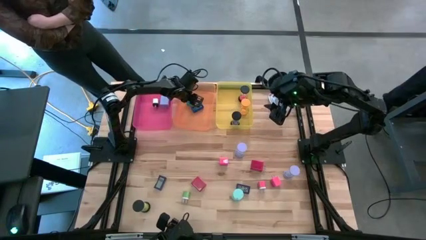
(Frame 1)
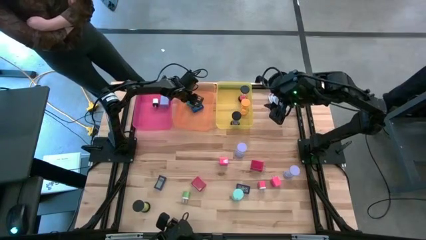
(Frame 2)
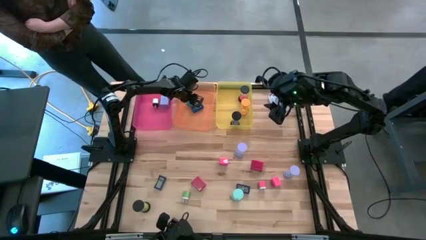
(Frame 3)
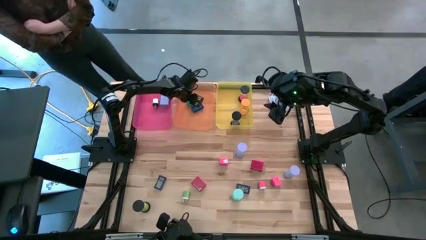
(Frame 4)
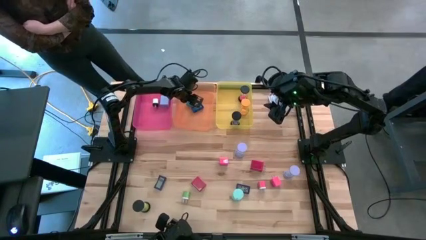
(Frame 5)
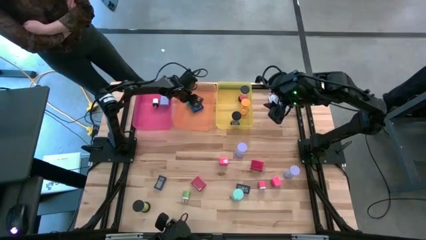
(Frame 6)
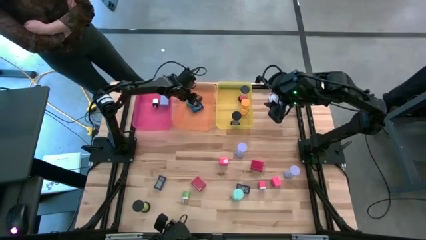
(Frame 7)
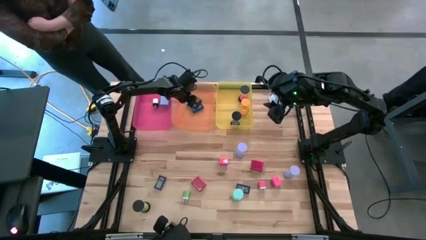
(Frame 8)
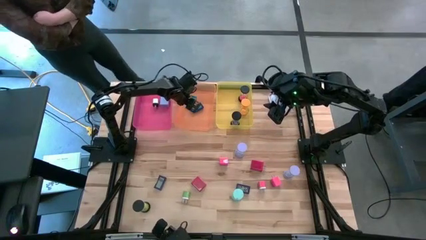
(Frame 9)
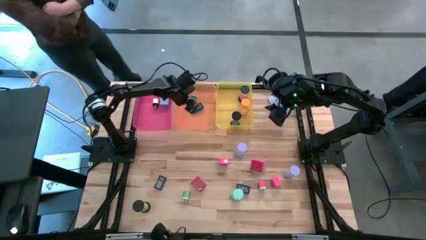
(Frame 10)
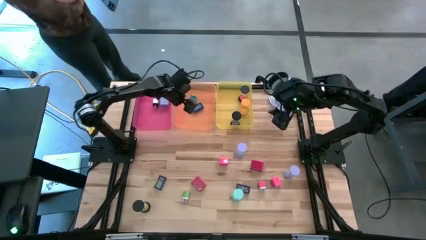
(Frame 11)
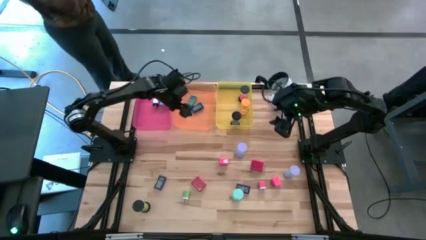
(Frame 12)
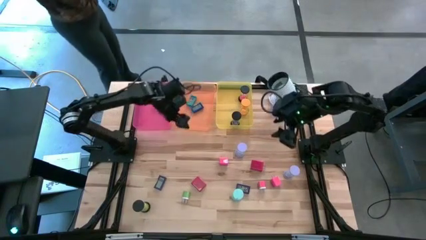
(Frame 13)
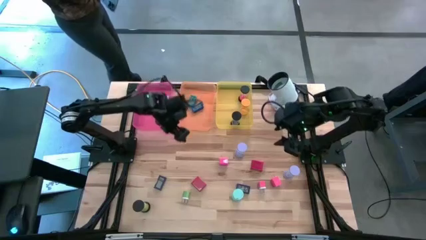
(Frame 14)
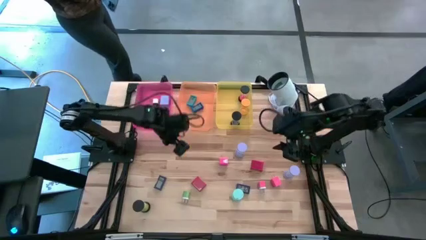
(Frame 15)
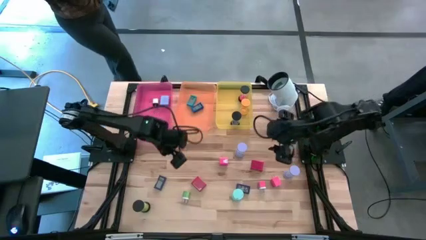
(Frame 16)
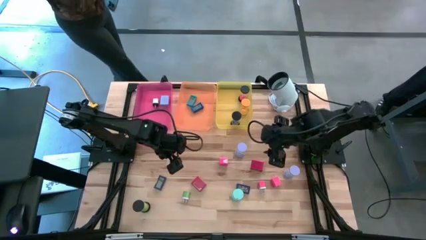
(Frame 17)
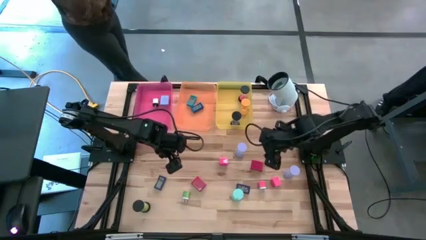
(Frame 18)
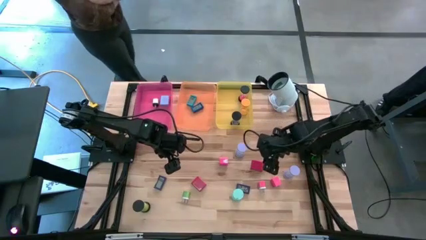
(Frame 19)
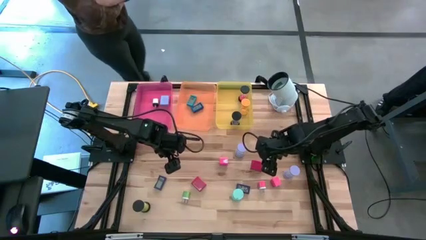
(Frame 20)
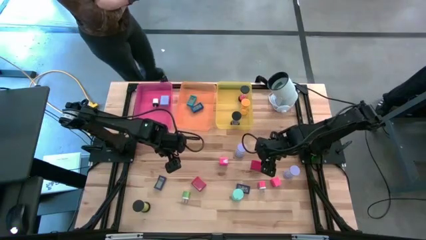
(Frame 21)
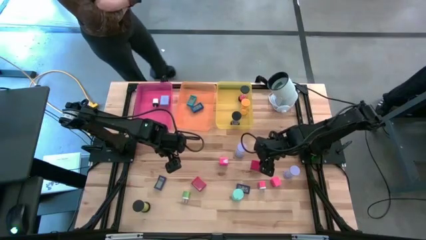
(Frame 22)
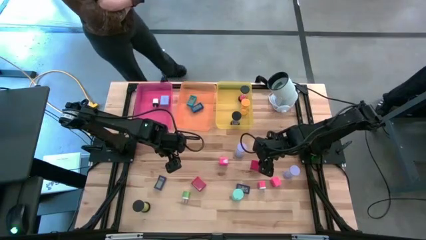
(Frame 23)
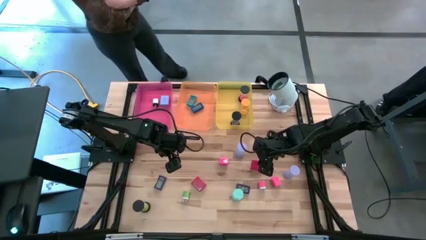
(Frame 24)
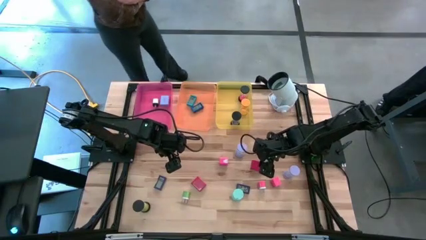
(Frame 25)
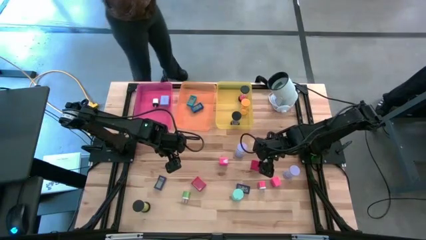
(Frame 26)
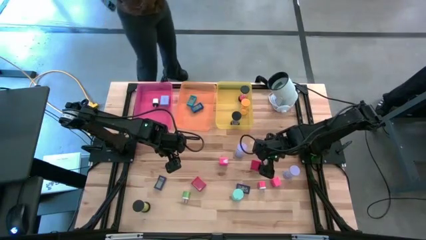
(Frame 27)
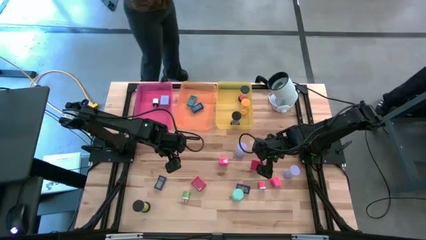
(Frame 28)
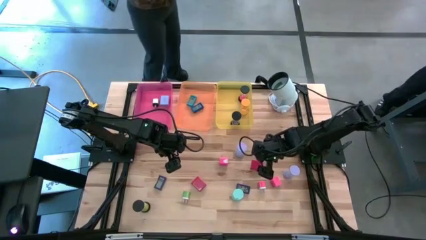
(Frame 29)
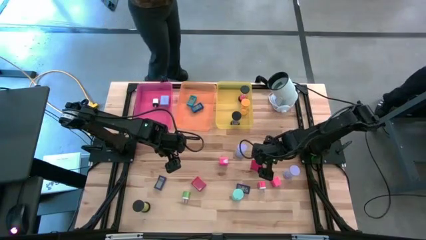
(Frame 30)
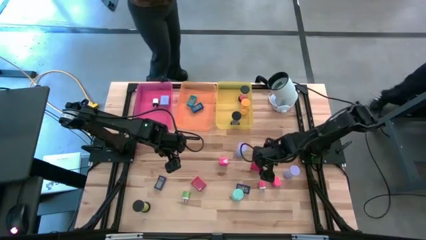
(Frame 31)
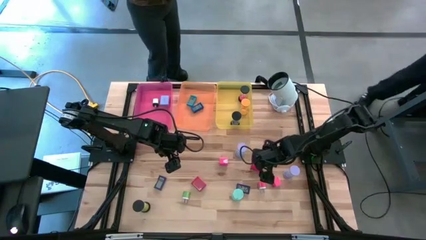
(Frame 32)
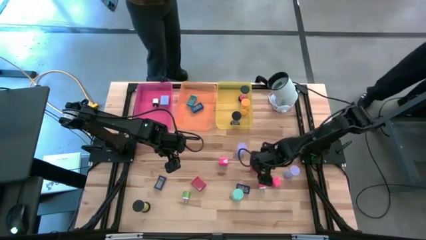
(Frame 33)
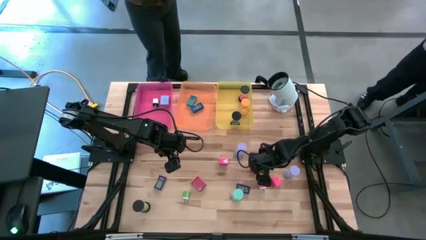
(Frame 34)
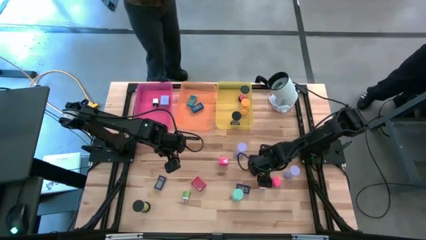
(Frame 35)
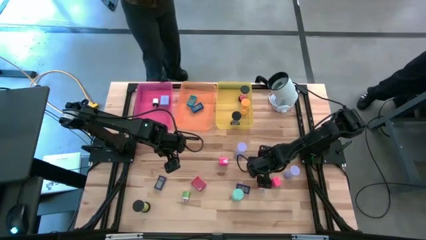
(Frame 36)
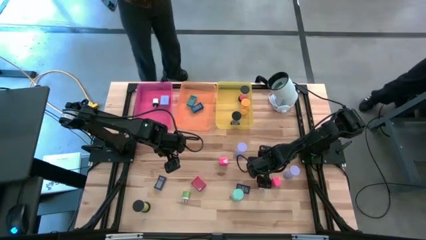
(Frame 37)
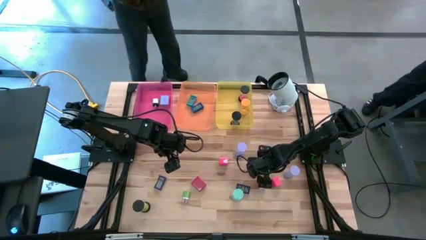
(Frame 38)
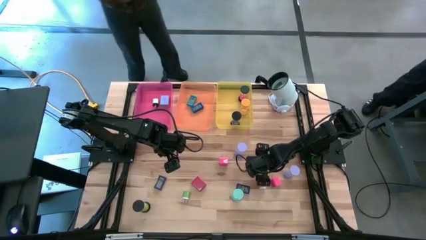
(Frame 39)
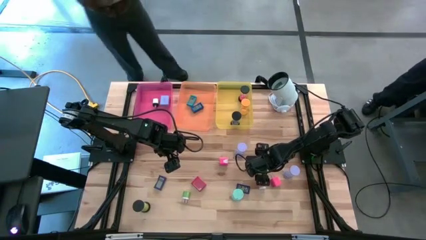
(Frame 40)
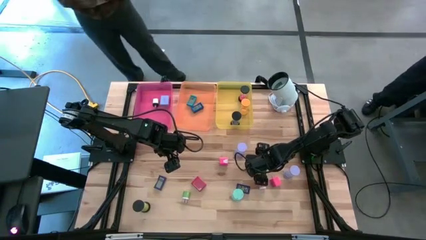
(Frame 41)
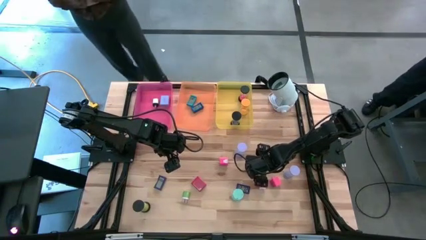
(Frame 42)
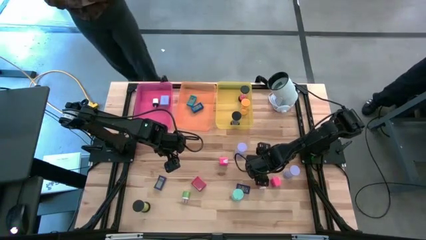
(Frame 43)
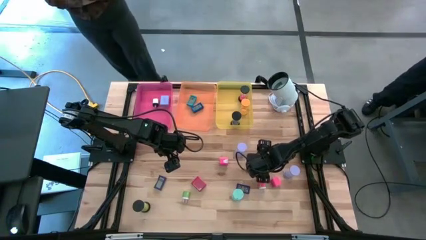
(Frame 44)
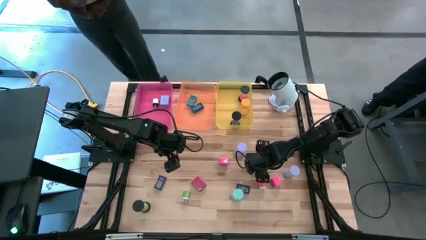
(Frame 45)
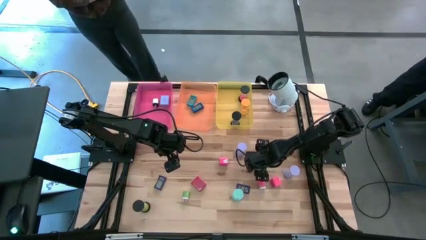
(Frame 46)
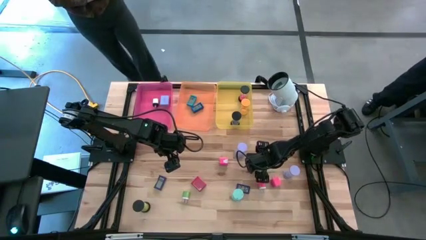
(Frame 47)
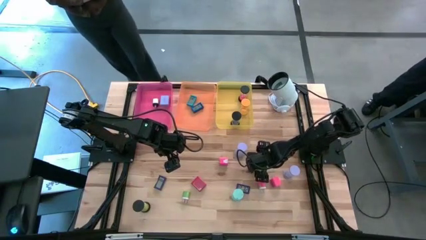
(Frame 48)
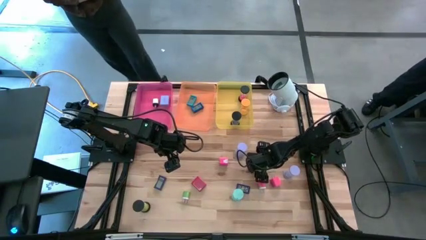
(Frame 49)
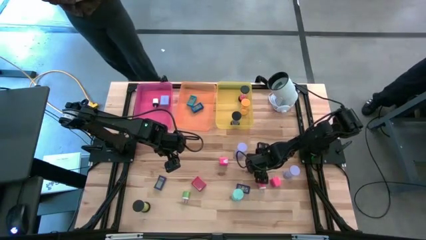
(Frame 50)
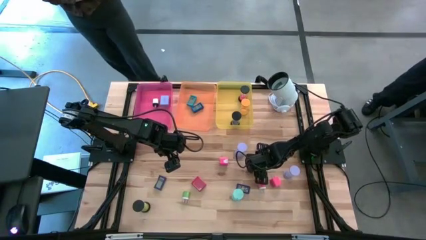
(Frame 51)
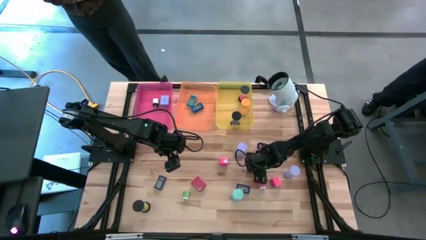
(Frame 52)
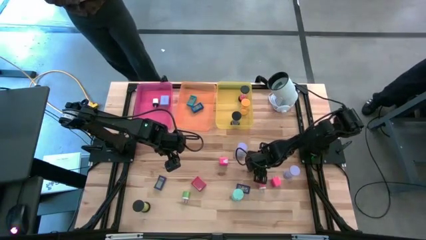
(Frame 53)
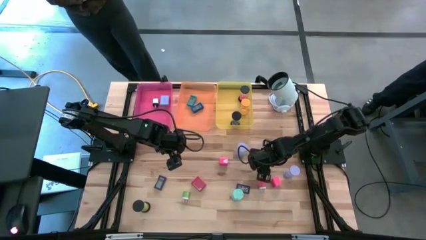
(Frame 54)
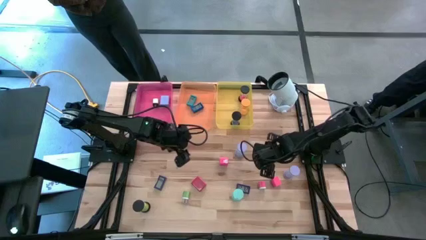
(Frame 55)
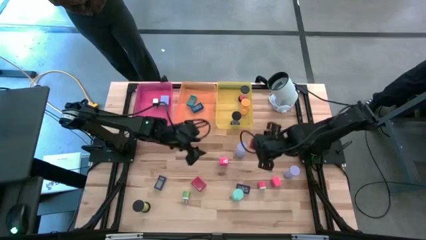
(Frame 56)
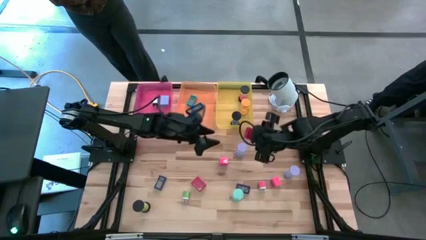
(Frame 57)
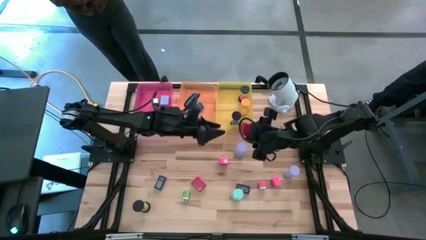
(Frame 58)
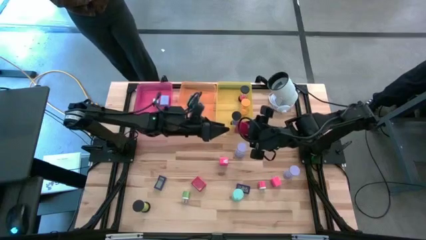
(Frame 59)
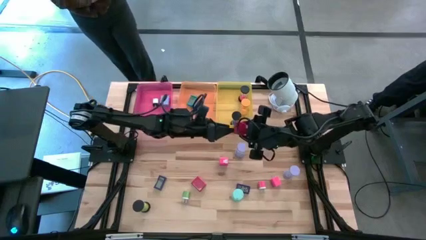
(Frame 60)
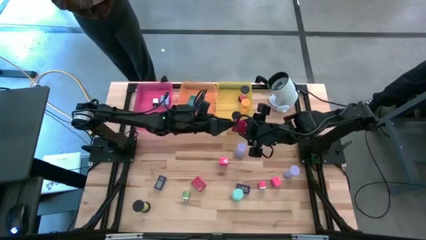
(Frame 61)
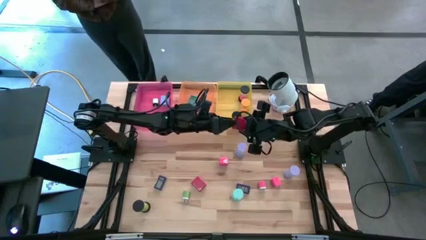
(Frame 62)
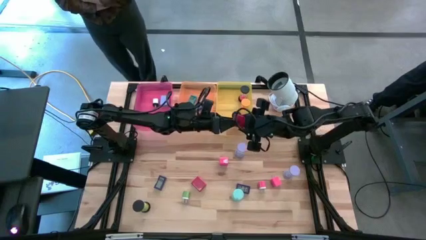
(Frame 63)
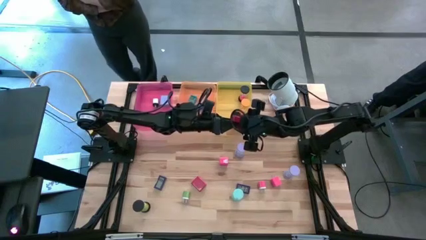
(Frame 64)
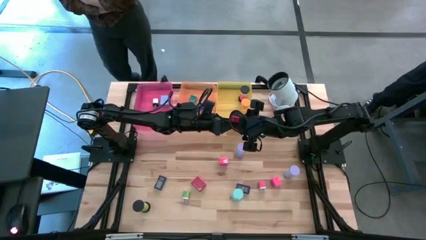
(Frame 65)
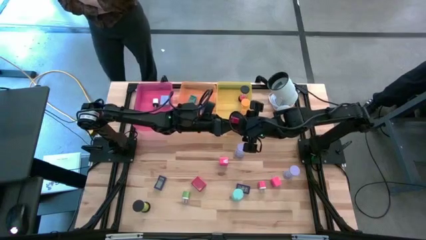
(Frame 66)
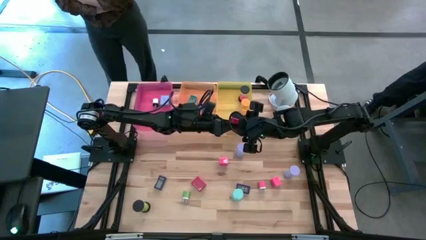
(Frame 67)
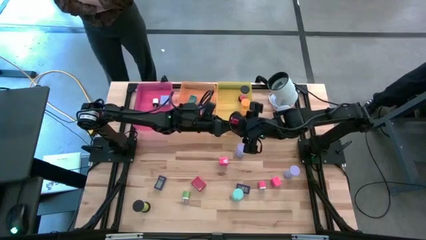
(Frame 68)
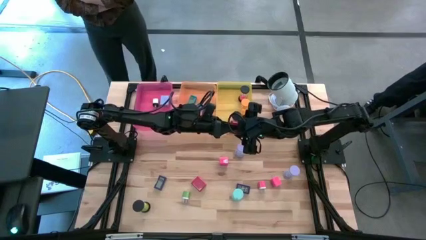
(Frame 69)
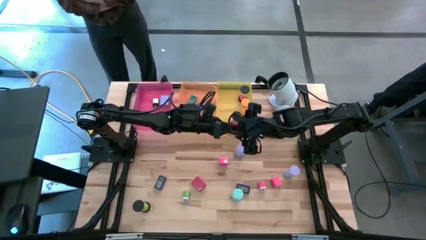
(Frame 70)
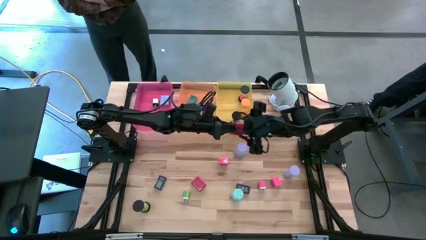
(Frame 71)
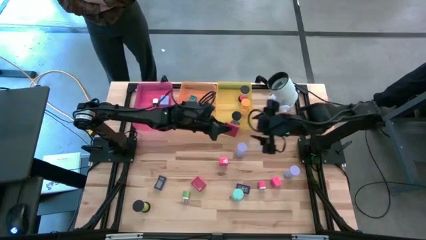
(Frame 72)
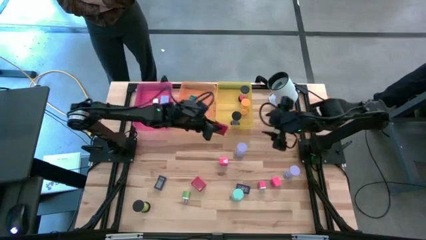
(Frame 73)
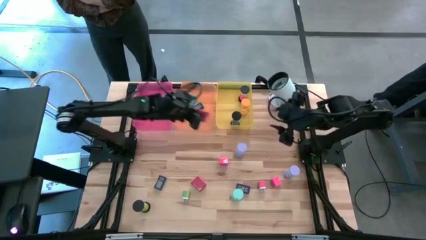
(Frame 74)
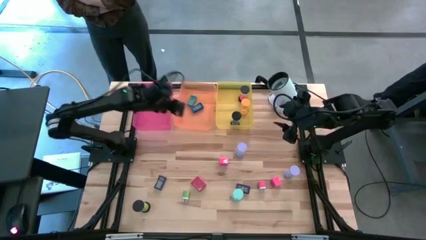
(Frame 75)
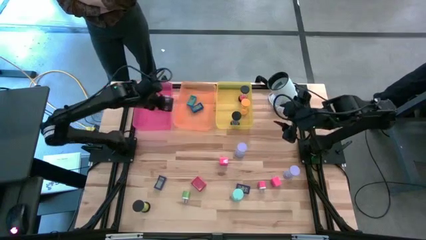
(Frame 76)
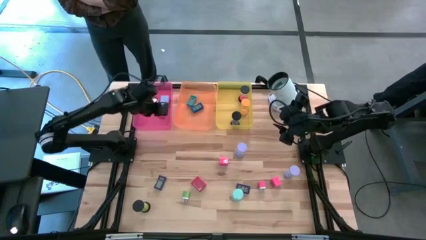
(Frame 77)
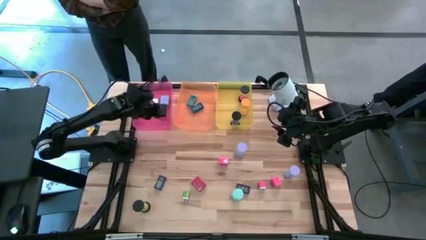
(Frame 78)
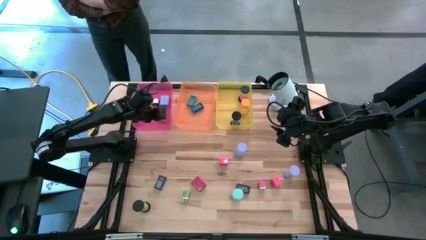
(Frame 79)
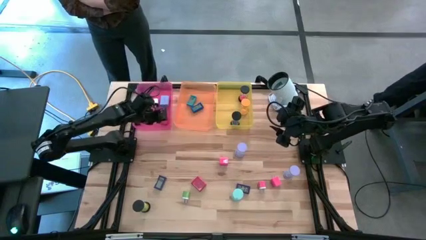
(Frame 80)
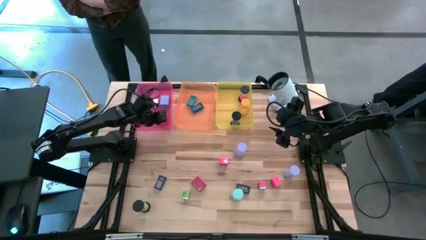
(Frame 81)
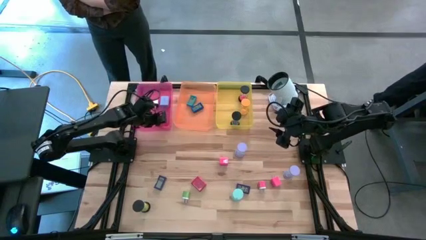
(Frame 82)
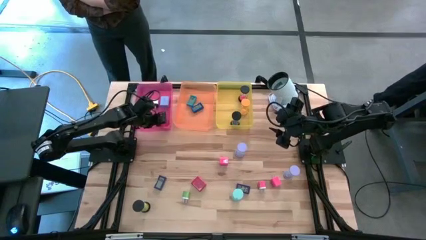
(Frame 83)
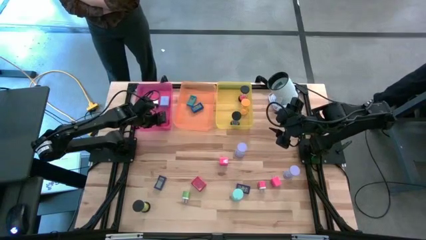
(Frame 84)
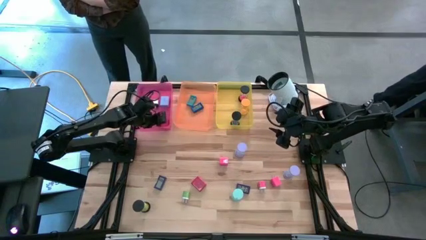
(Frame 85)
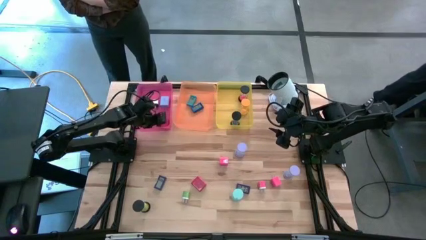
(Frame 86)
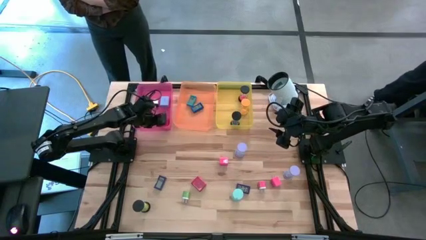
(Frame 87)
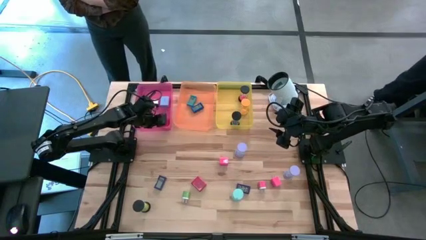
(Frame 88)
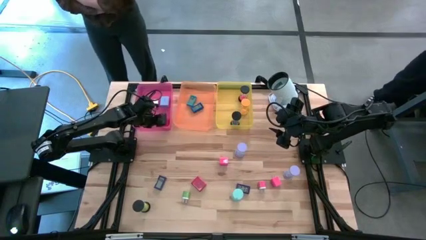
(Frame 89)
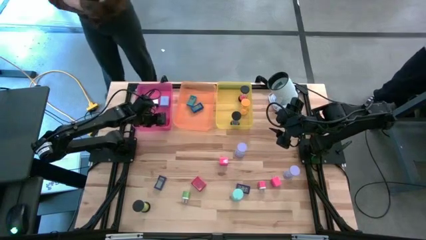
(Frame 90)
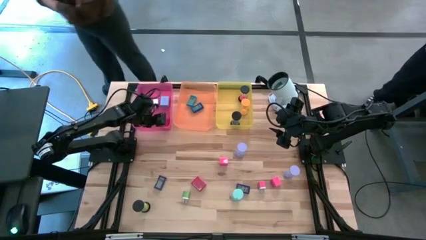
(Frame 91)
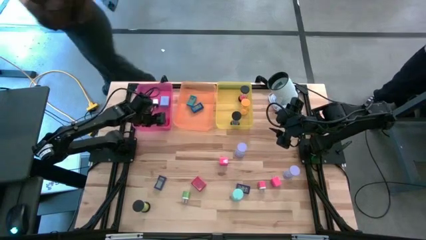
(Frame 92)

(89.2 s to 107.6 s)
Task: Pick & Place Office items
Put the right red charger adapter into the red bin
